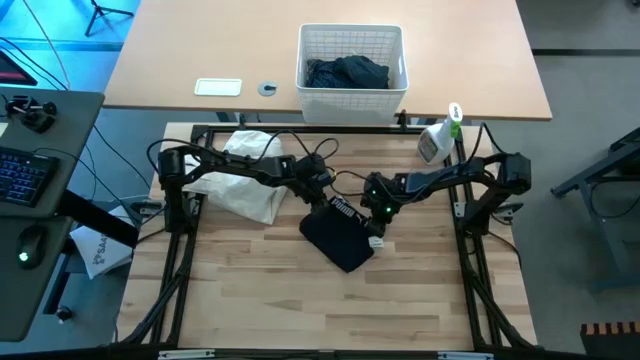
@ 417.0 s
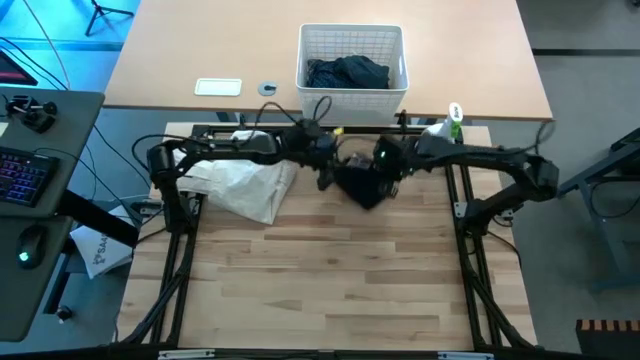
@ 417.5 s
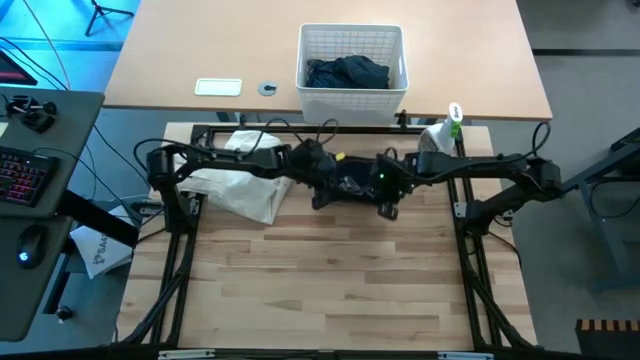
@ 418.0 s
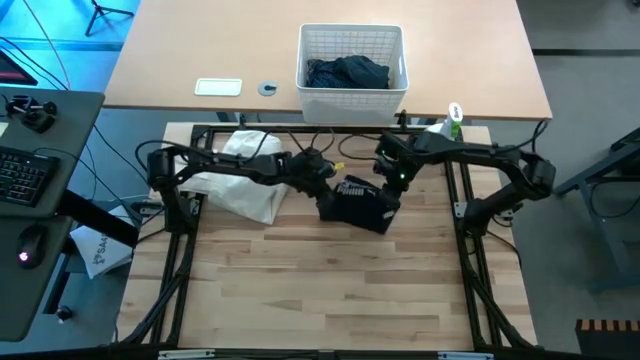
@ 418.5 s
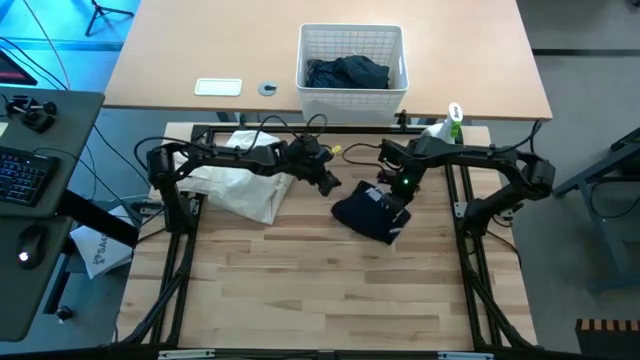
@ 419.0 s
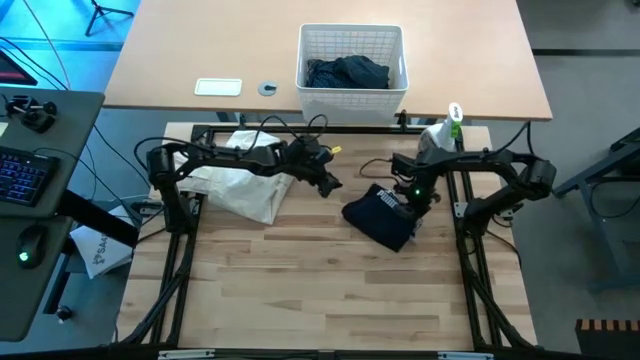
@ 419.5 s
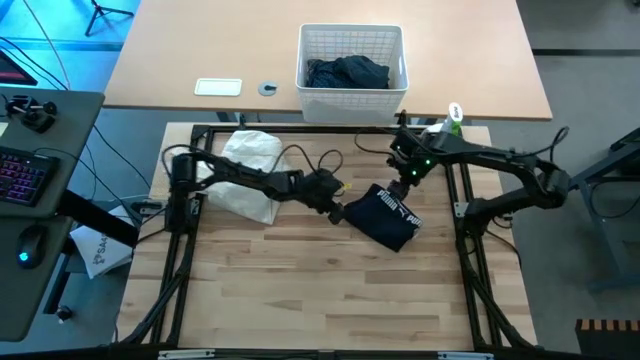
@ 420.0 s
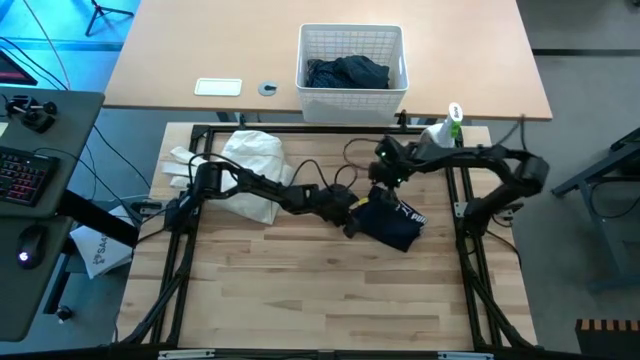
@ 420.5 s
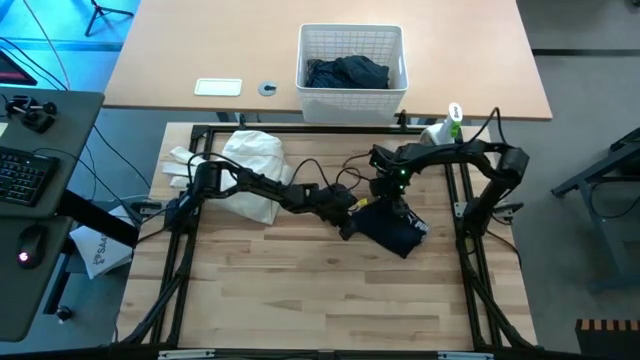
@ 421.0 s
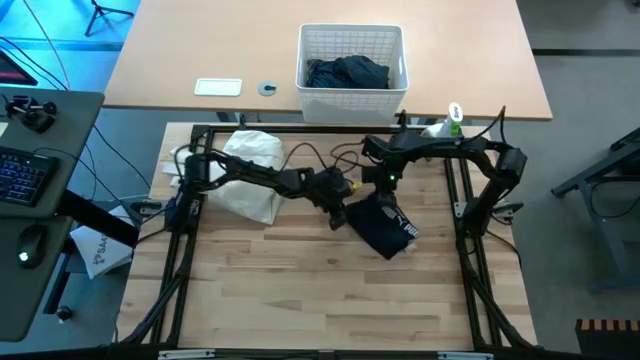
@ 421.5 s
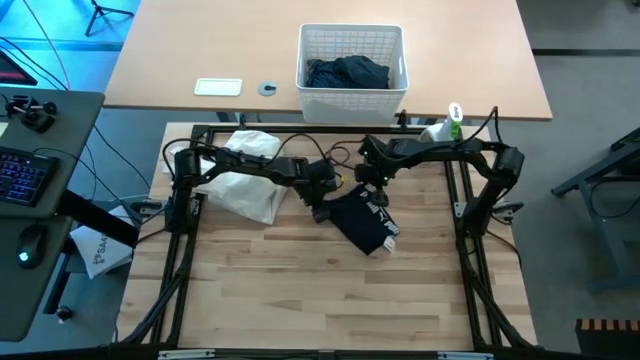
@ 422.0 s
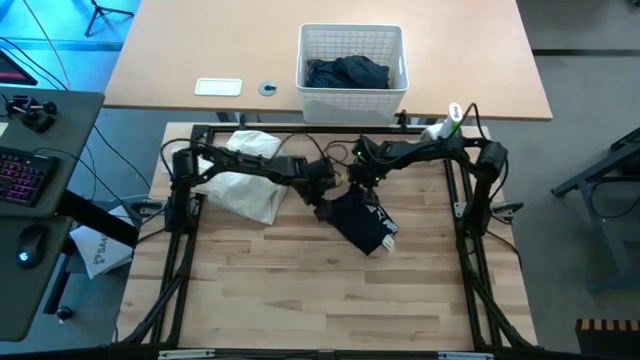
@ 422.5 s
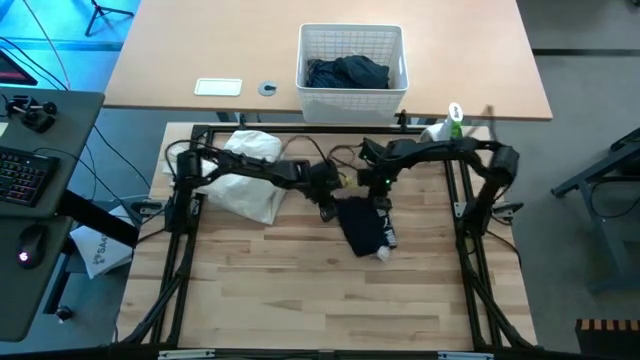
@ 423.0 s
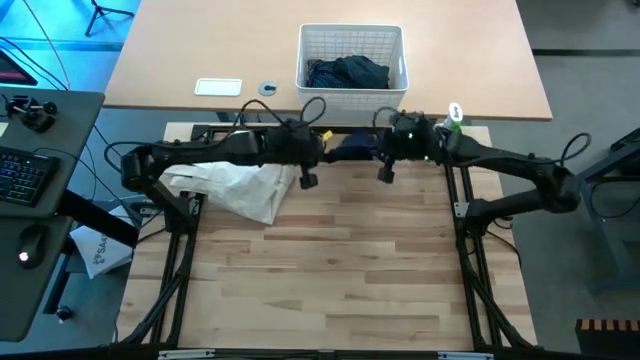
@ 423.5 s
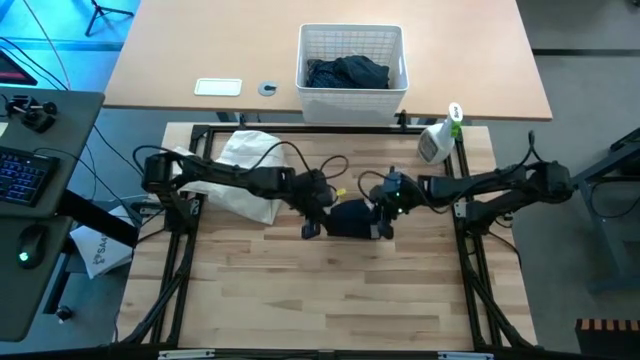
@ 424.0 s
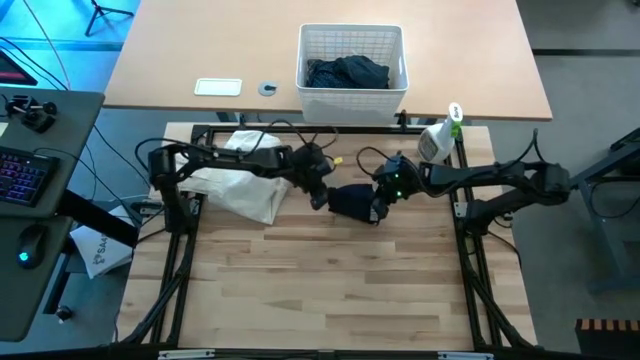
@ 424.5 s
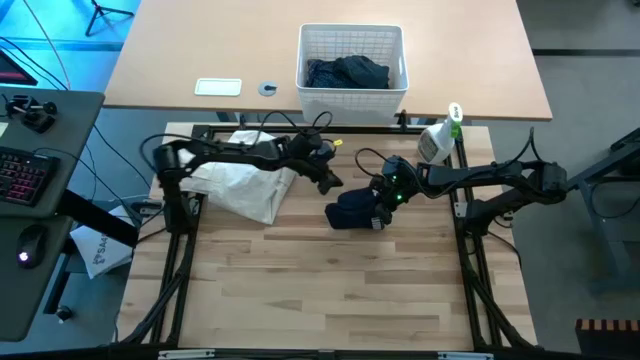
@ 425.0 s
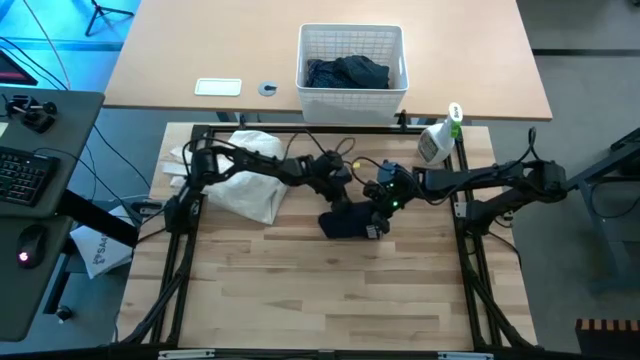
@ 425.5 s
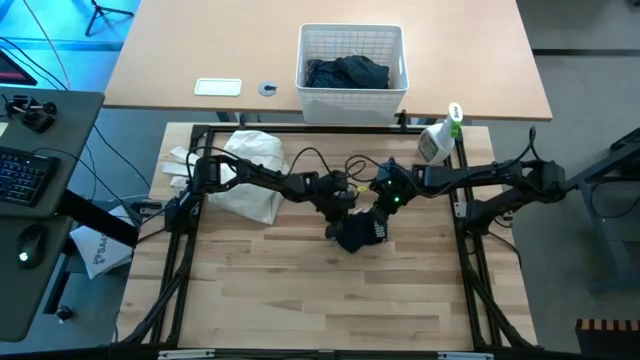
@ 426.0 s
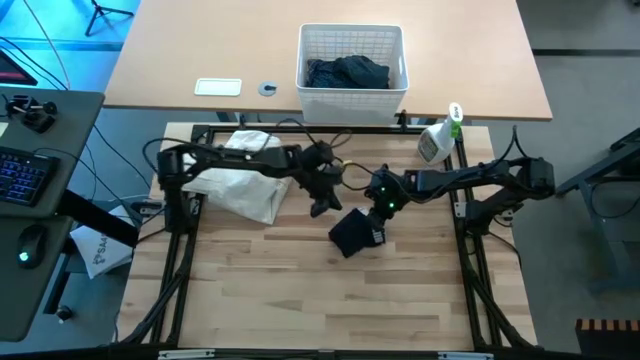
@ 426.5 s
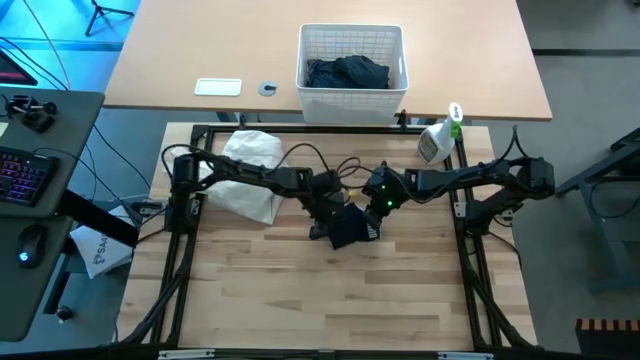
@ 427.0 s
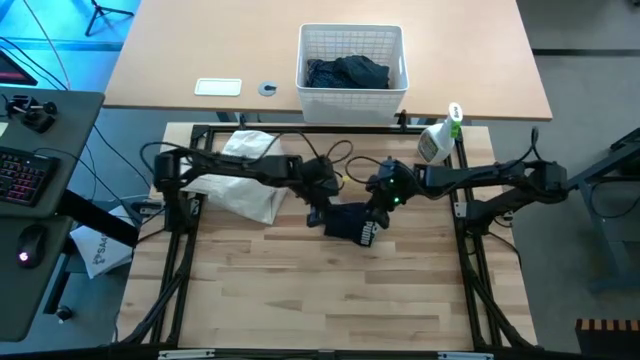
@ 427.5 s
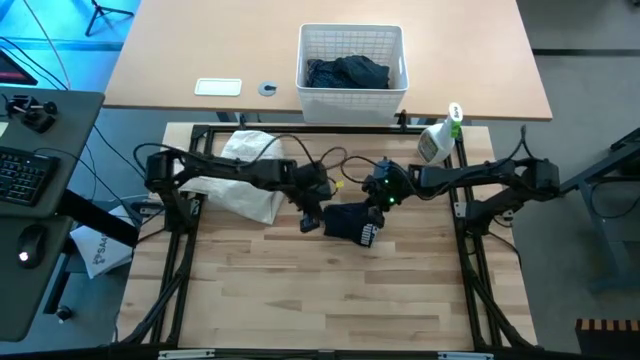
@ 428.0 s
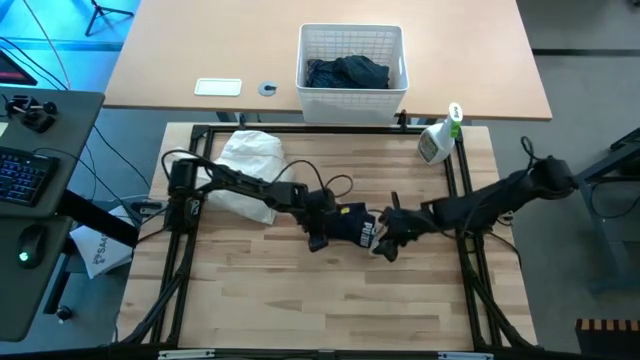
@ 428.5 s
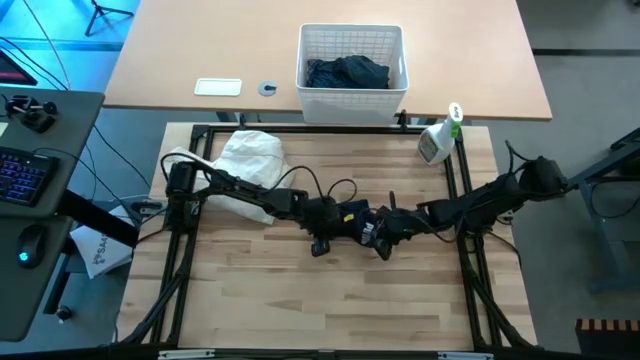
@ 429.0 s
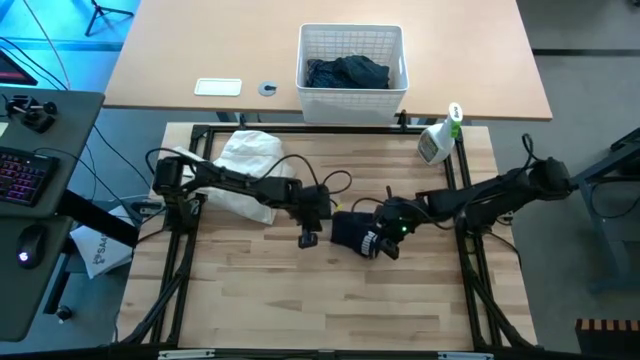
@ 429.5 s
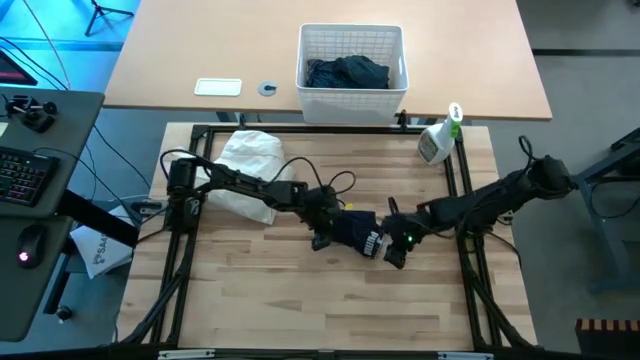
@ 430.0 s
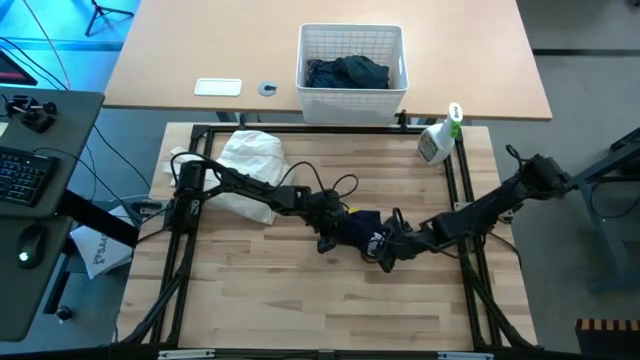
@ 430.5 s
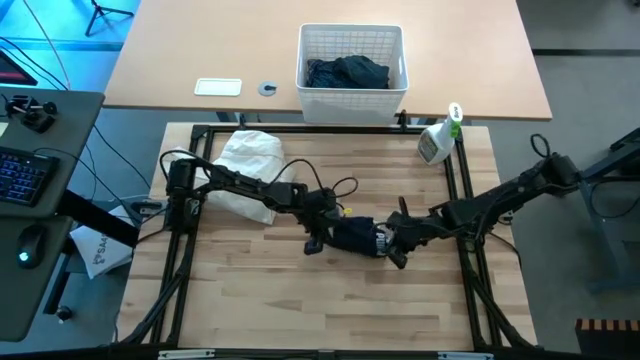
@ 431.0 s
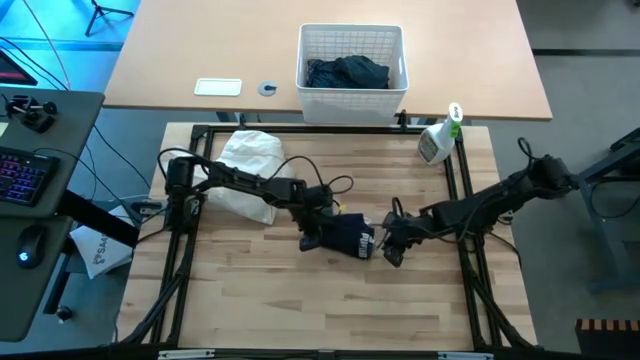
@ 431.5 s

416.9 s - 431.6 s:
Task: Fold laundry
Fold the blue underwear

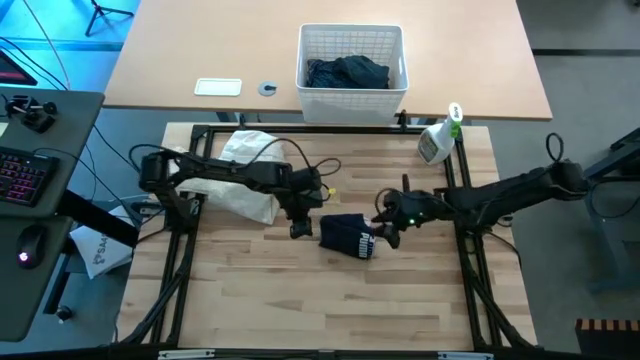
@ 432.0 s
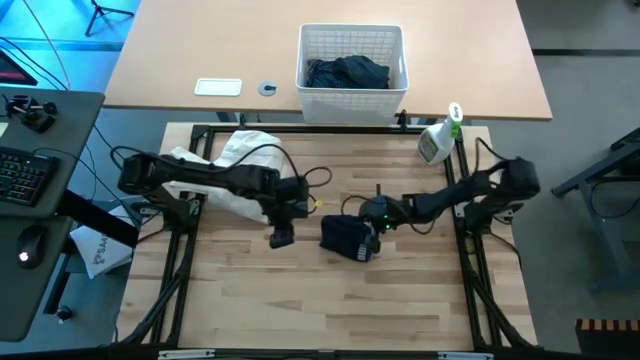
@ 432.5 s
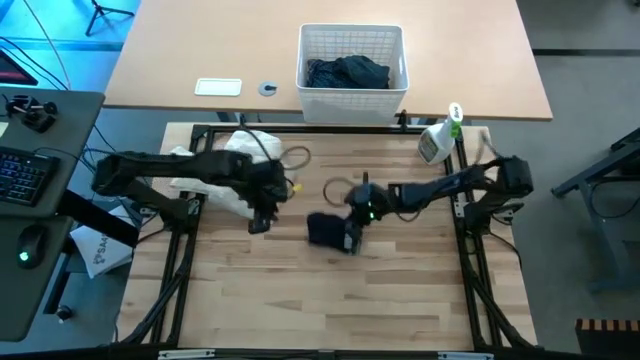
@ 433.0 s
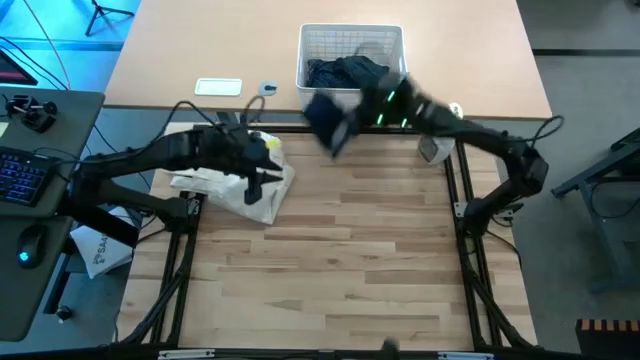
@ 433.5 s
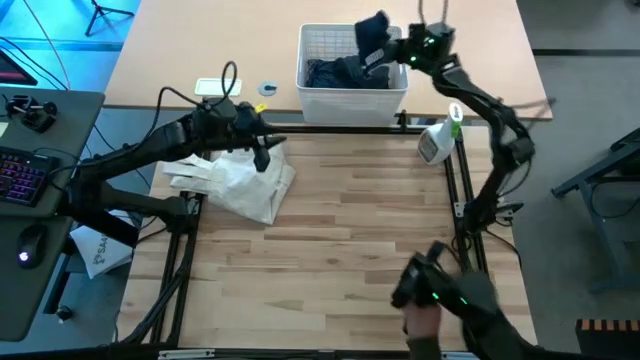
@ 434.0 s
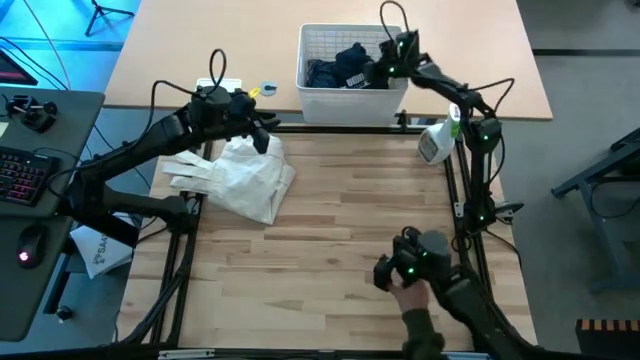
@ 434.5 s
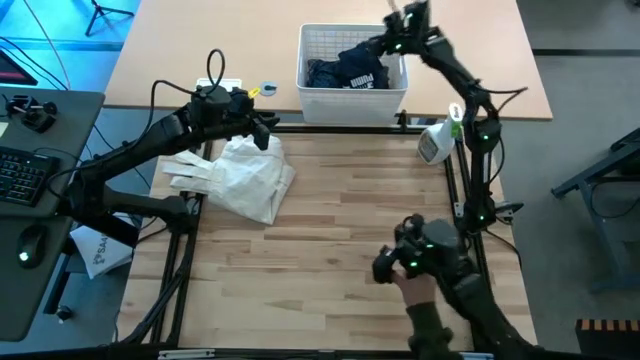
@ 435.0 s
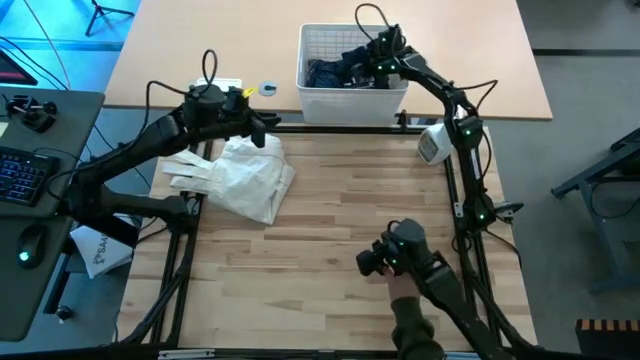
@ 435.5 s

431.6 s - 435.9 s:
Put the blue underwear into the laundry bin

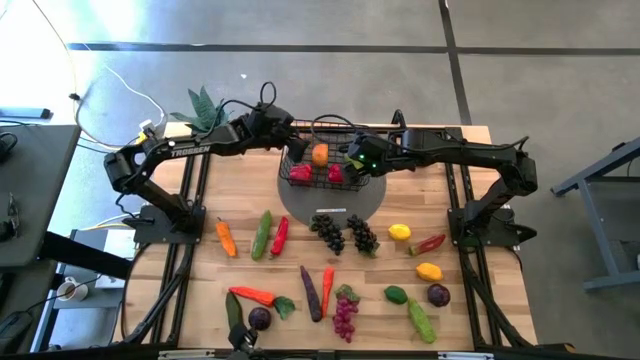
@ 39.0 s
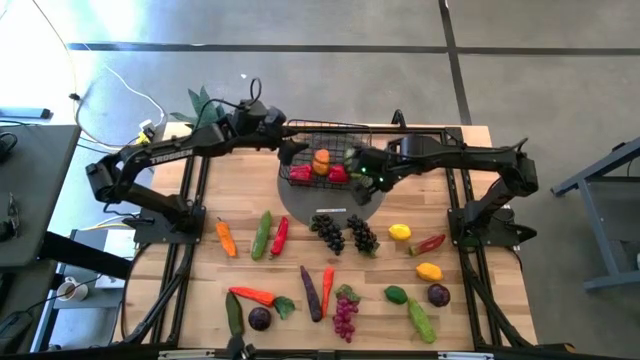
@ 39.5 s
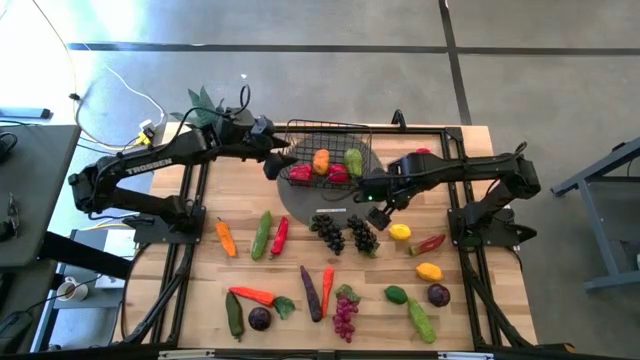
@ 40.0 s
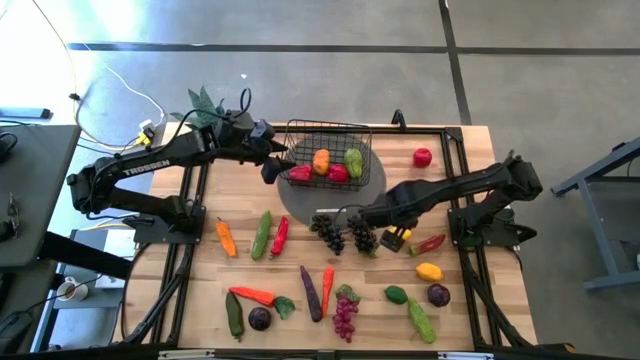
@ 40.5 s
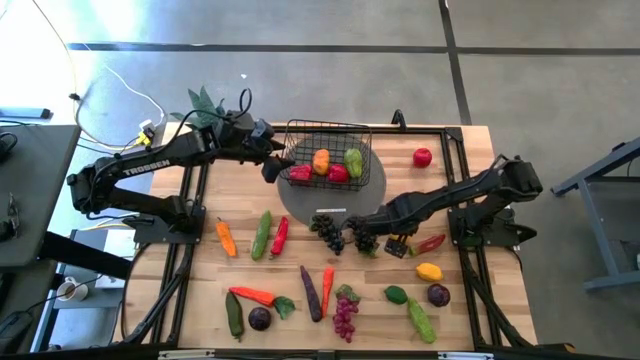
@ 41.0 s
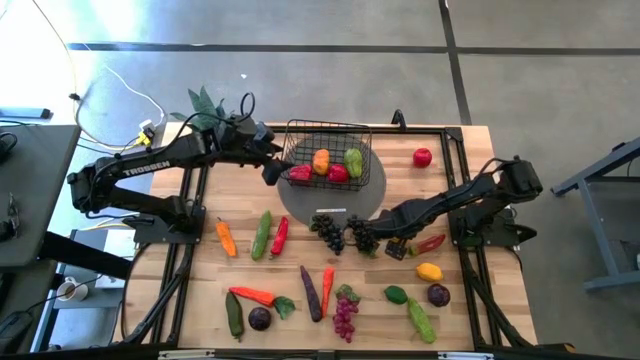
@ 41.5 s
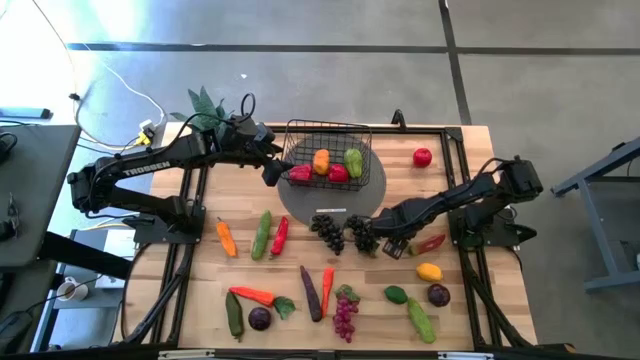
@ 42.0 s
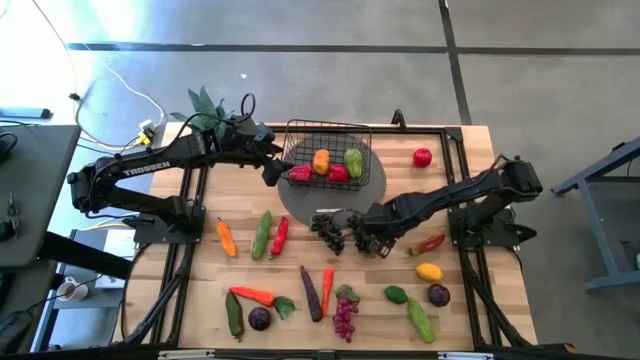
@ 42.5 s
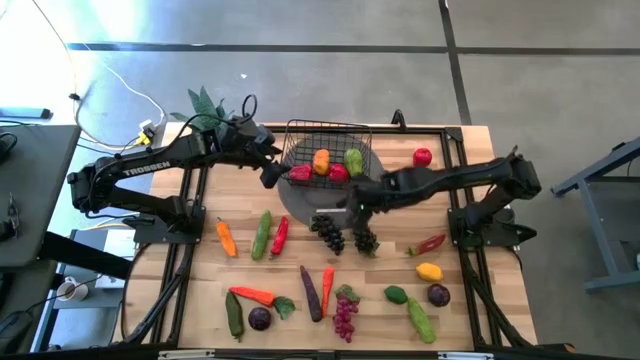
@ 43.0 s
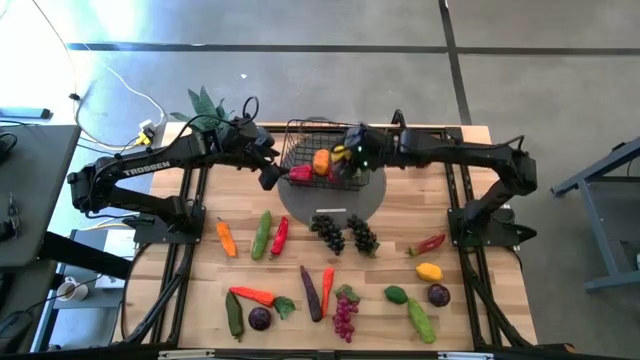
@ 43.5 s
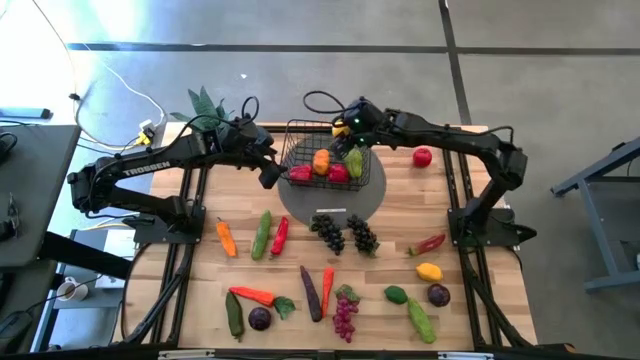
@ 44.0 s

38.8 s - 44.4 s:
Task: Build produce basket
Put the yellow lemon into the wire basket
